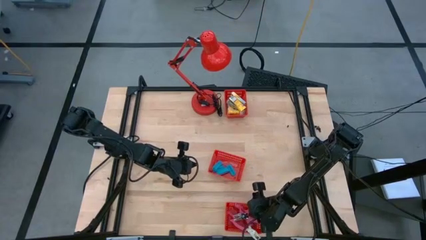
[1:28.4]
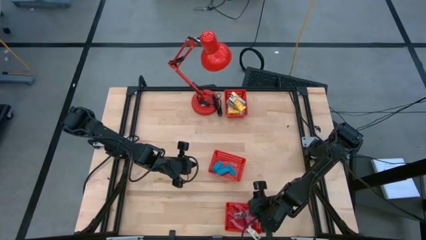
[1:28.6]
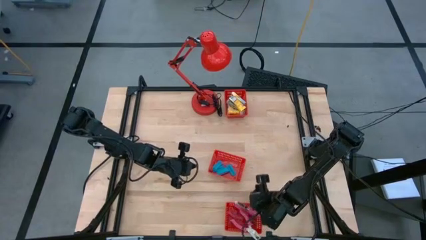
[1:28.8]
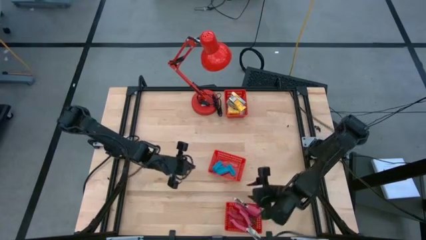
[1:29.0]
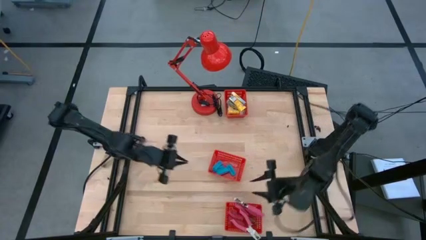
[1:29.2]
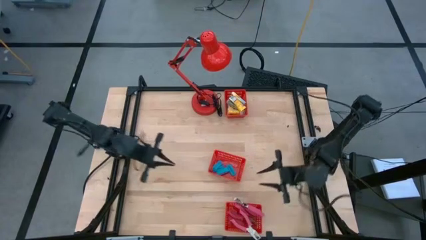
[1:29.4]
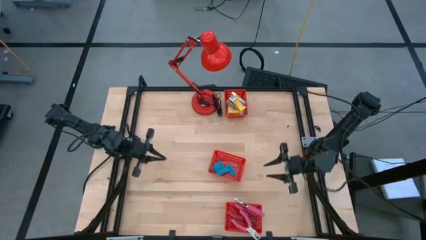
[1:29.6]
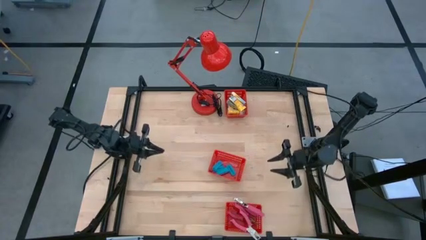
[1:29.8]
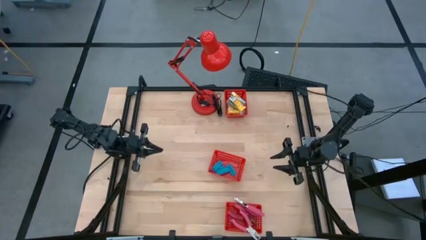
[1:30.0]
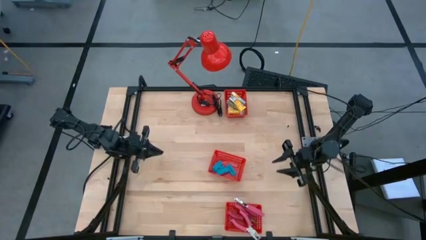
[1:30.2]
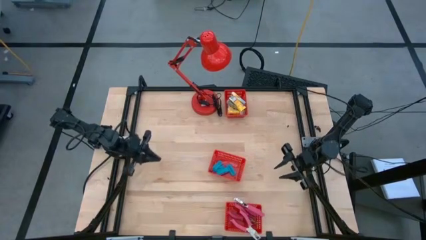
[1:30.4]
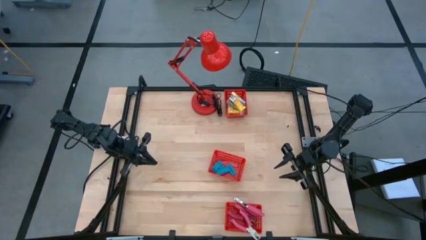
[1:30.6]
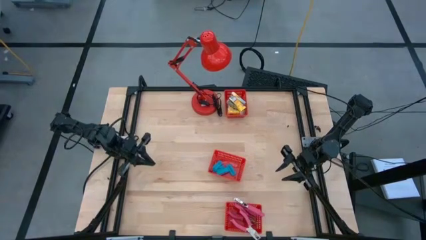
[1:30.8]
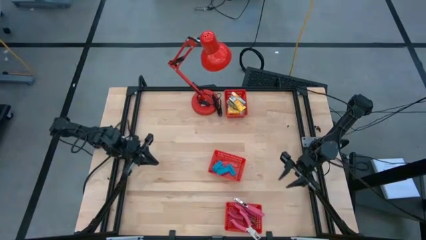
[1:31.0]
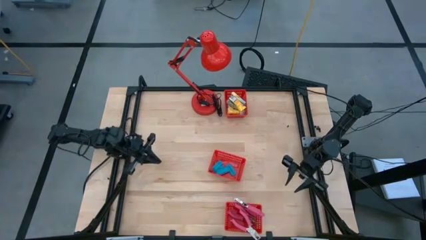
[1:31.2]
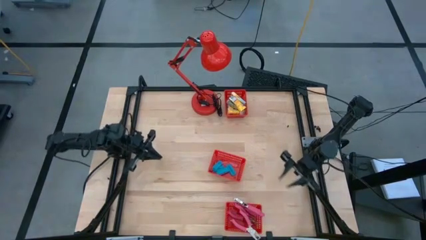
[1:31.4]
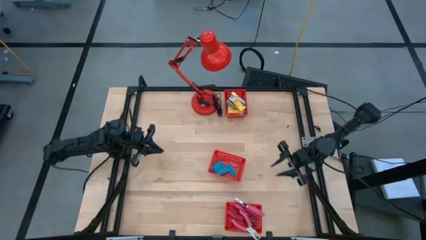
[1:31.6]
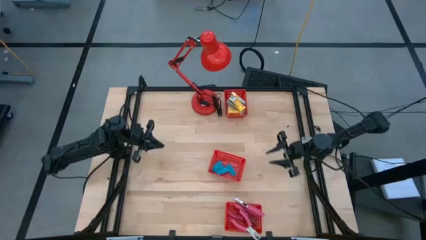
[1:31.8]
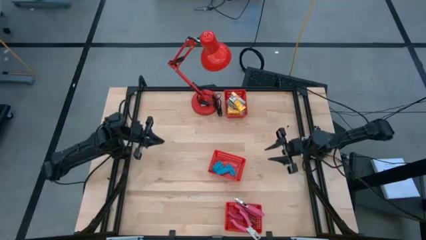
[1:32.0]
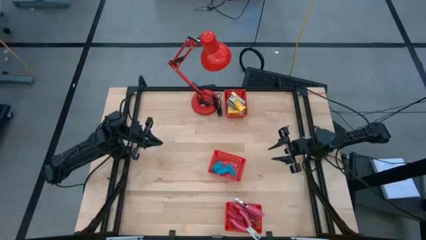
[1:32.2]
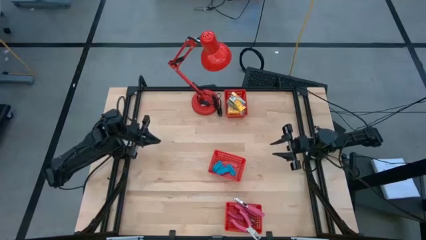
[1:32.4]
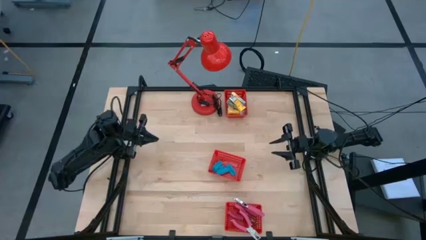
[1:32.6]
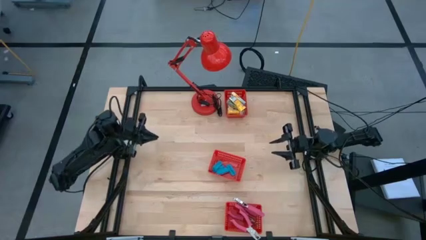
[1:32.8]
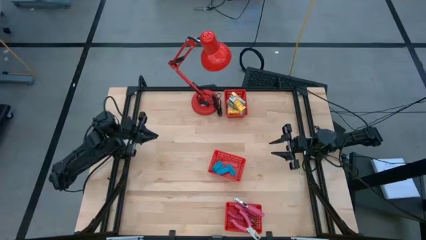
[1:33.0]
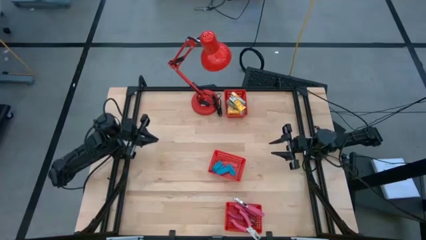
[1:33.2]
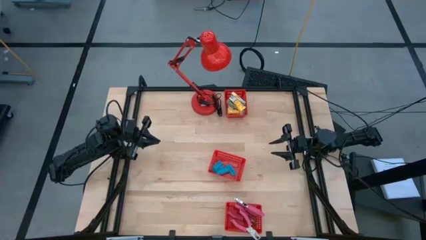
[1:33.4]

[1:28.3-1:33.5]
Task: Pick & Place School Supplies
Return to Home Position

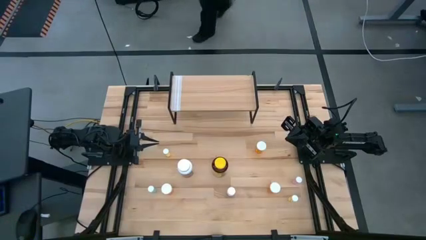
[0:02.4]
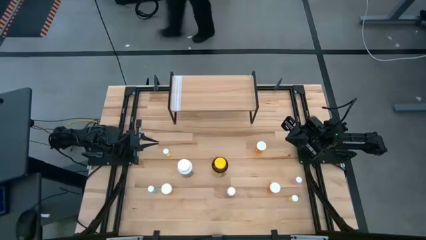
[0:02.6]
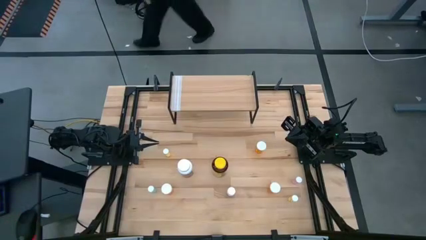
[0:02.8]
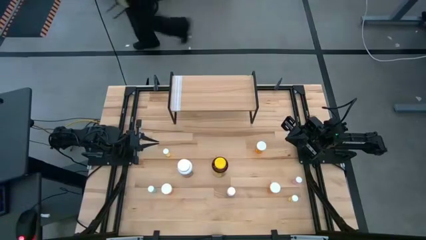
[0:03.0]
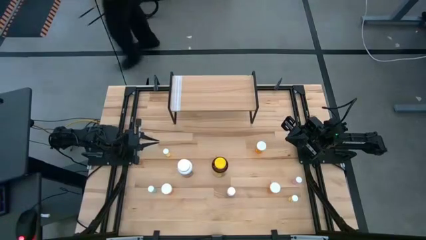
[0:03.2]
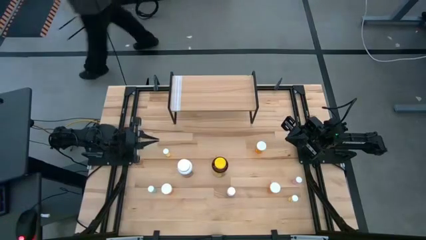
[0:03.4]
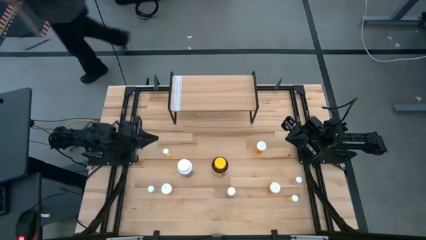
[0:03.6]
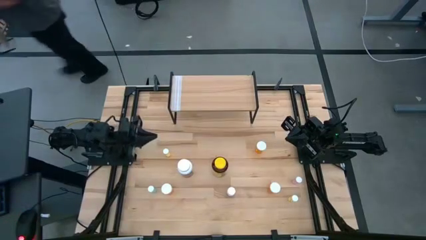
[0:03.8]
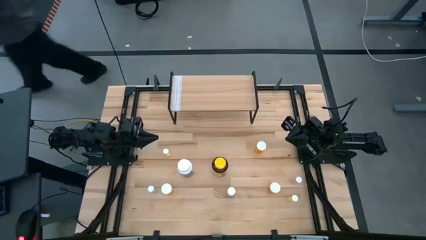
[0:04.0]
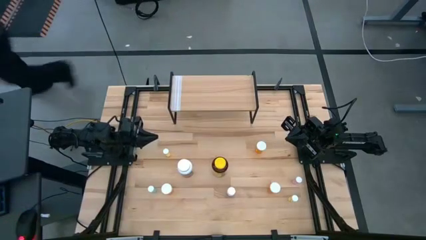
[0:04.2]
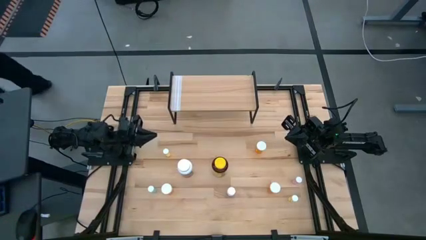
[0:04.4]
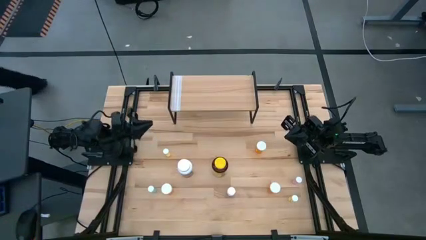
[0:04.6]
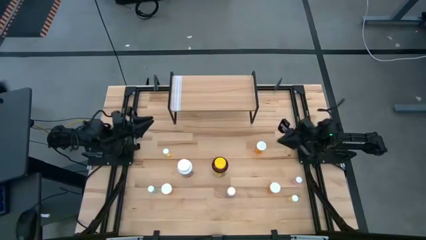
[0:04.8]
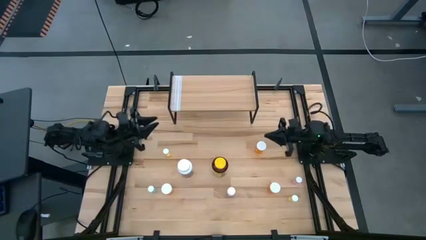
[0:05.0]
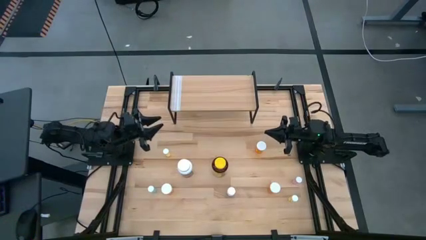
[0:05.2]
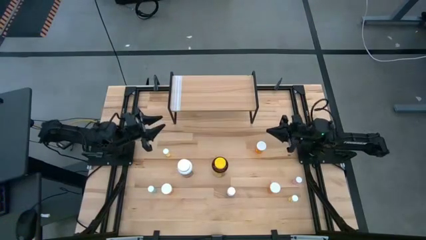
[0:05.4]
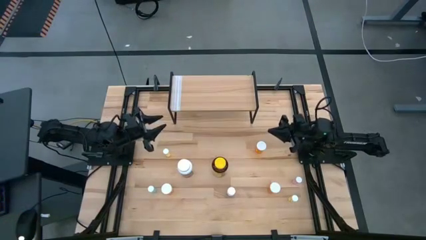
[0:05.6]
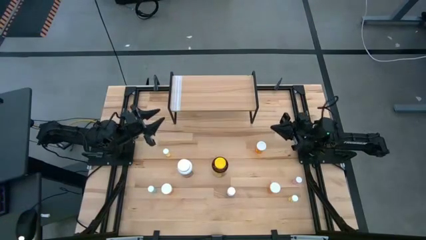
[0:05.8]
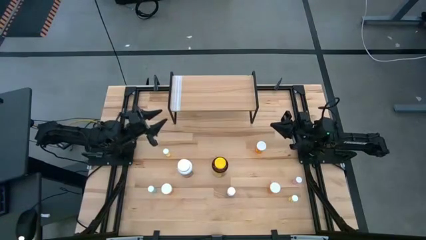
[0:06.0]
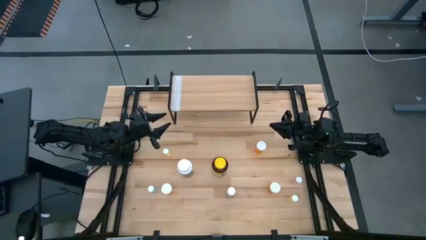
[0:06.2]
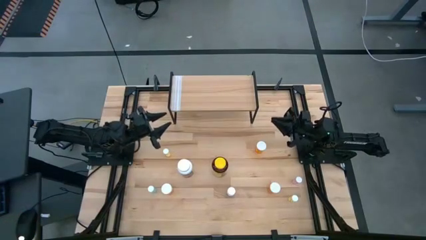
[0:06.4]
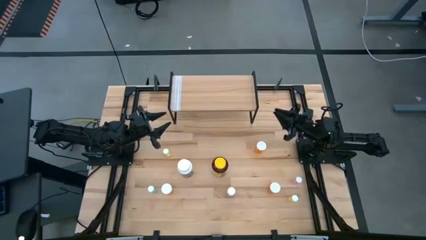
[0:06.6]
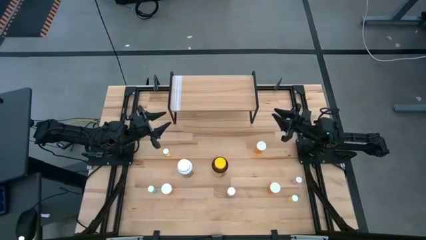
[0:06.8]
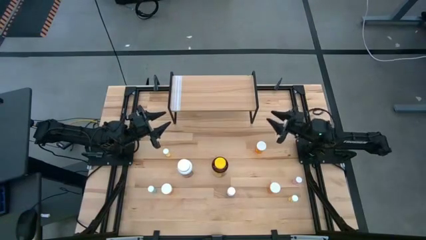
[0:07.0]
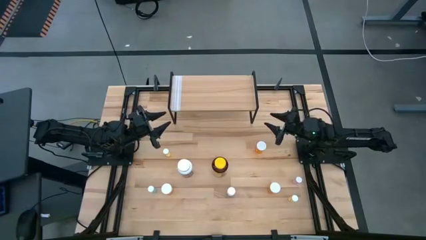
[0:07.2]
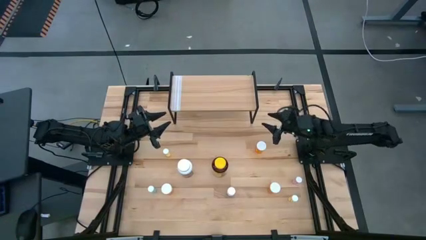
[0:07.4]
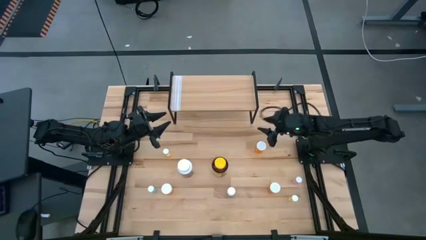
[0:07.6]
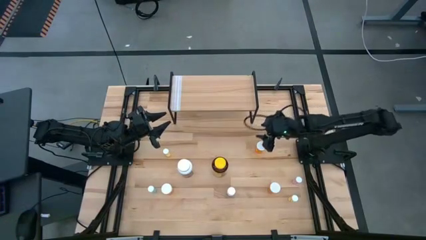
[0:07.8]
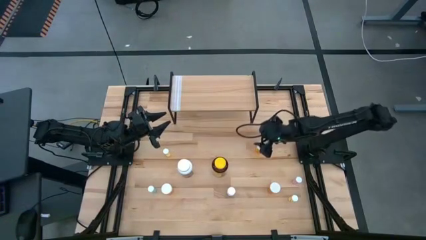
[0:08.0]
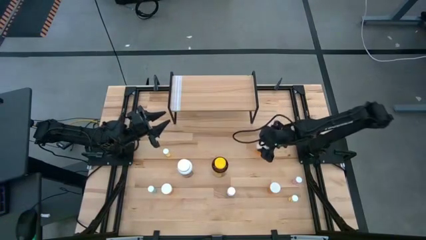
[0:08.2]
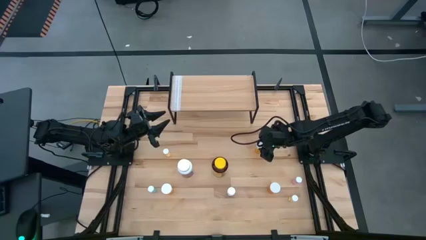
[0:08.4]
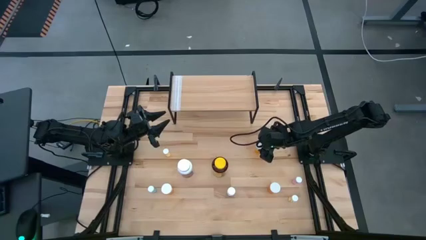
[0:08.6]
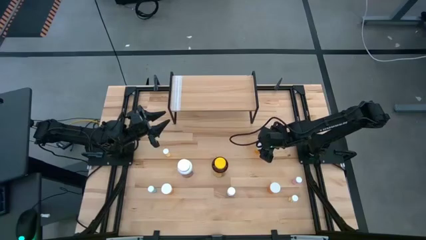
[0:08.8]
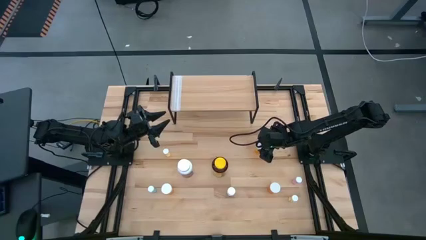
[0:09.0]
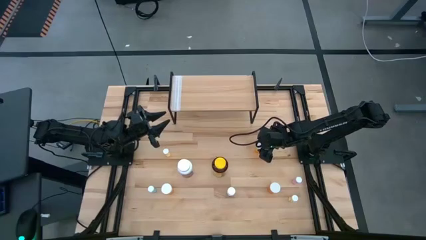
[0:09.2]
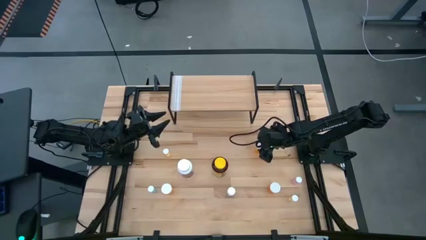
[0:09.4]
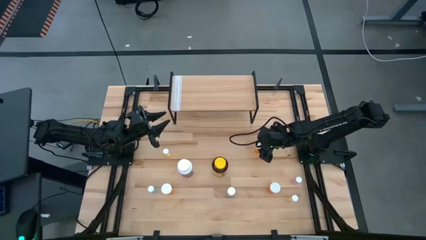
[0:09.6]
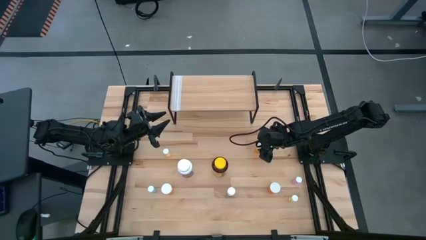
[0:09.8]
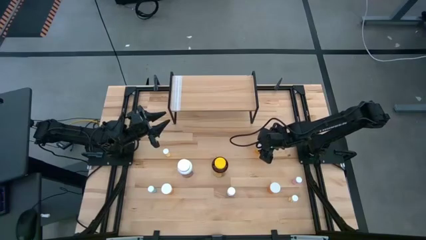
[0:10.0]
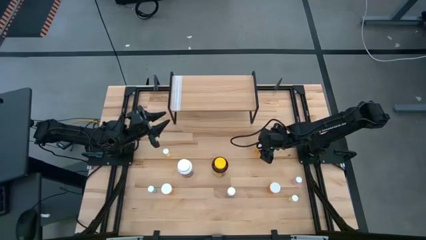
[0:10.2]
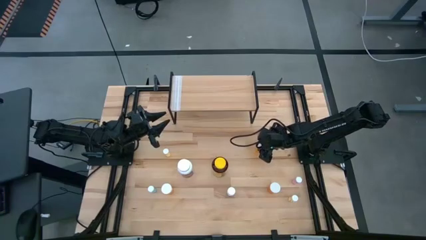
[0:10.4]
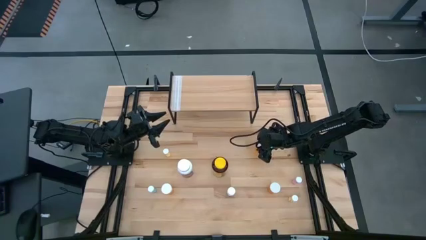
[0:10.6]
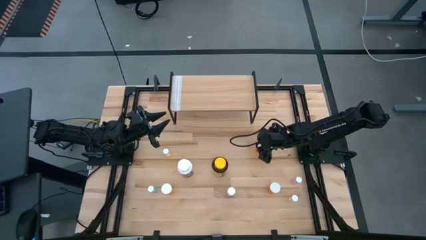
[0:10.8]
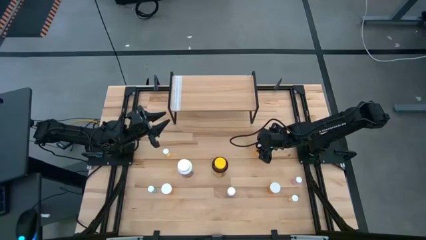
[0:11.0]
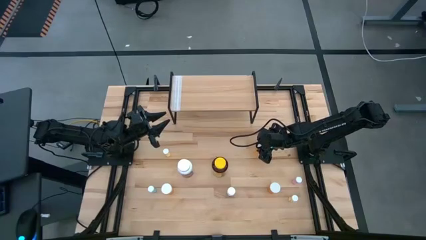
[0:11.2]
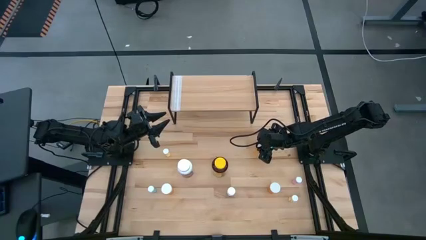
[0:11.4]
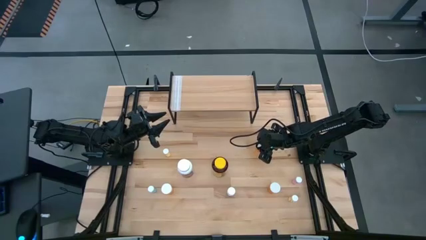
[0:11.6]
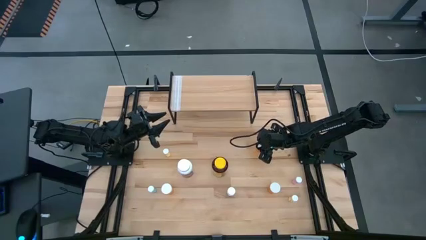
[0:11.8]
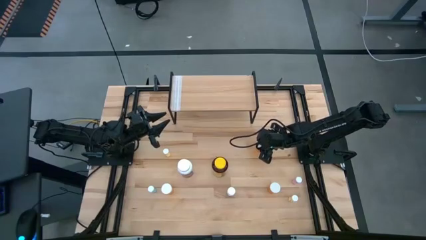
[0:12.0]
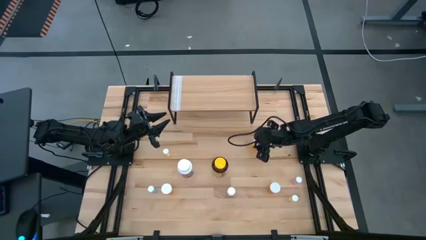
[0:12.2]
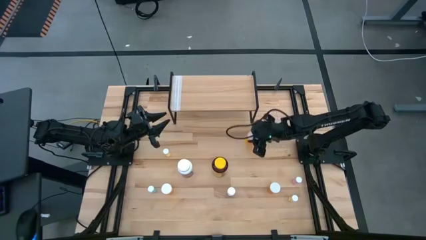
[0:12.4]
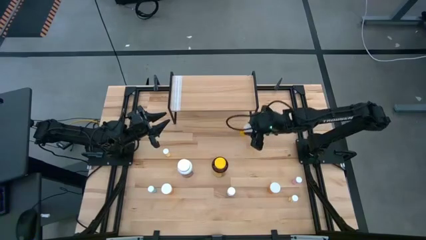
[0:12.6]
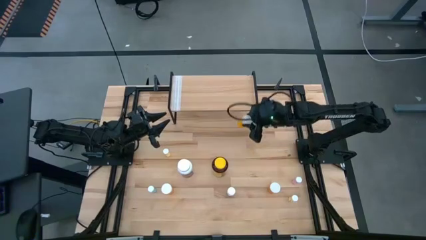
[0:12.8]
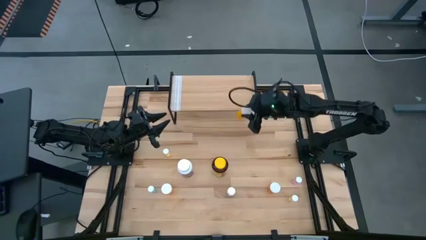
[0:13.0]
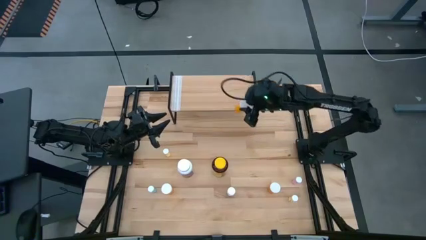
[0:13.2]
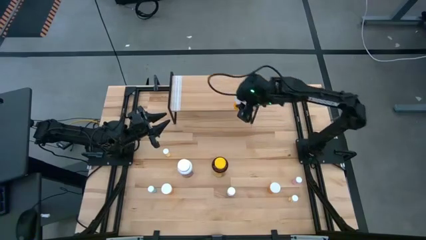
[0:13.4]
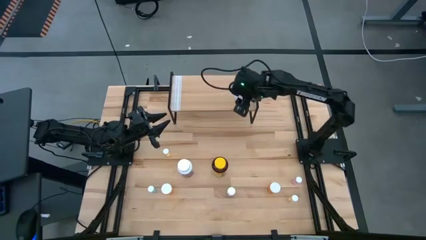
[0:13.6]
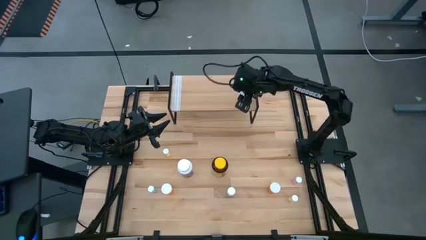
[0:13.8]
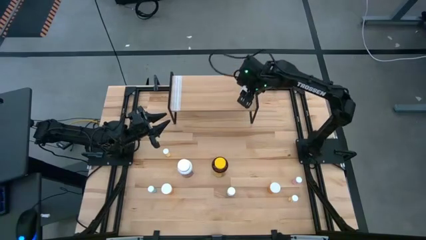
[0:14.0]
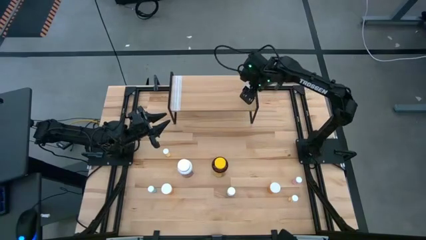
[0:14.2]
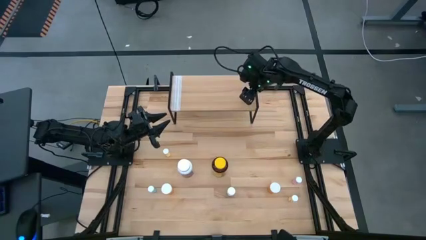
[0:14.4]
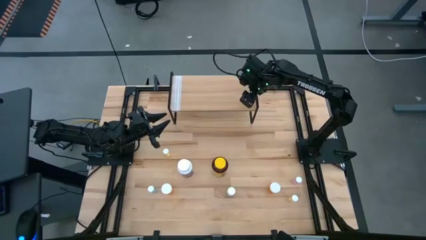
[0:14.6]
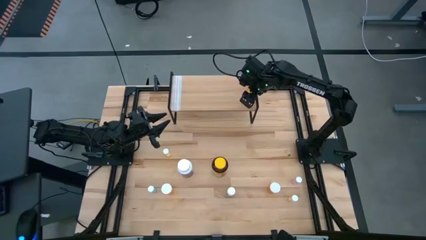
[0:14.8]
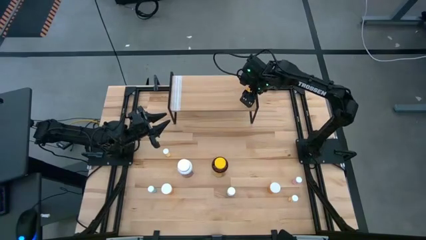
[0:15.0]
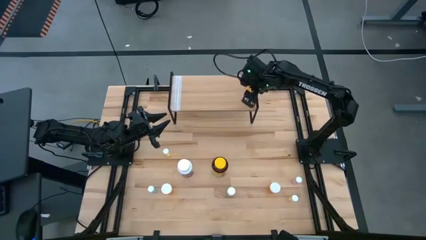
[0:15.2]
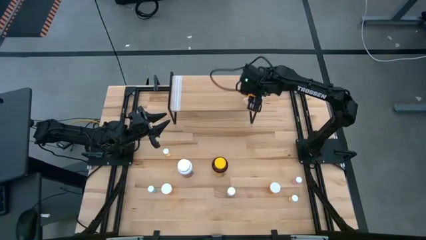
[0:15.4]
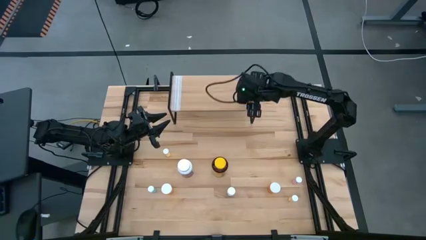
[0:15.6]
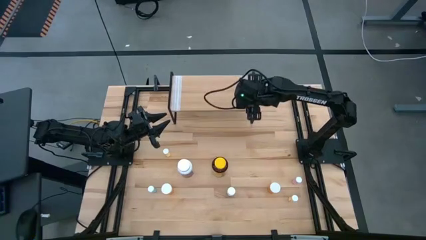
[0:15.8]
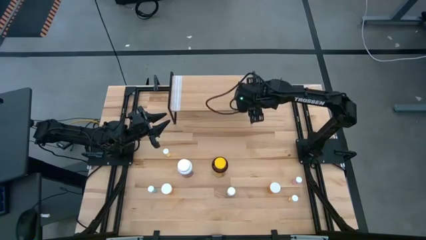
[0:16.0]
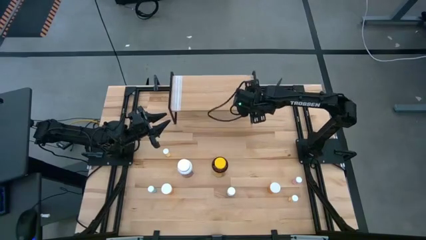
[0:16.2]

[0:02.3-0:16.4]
Task: Pick and place medicine bottles onto shelf by color
Put the top small orange medicine bottle on the shelf
